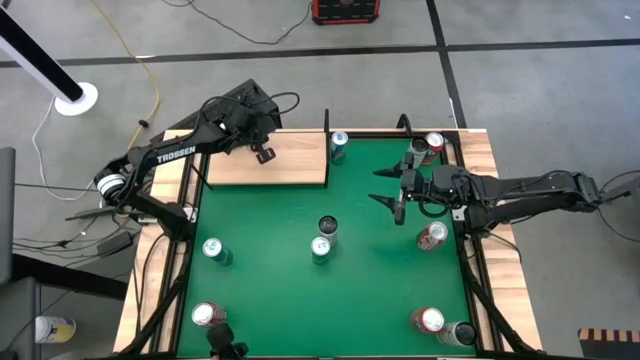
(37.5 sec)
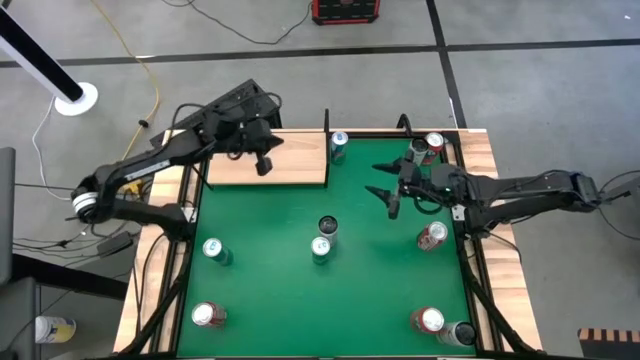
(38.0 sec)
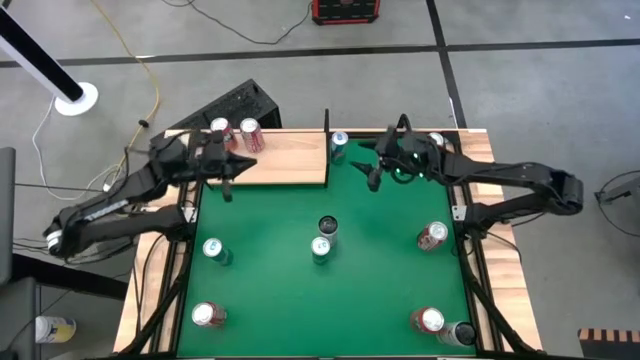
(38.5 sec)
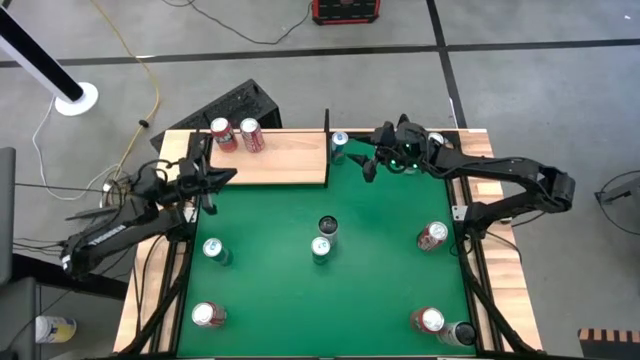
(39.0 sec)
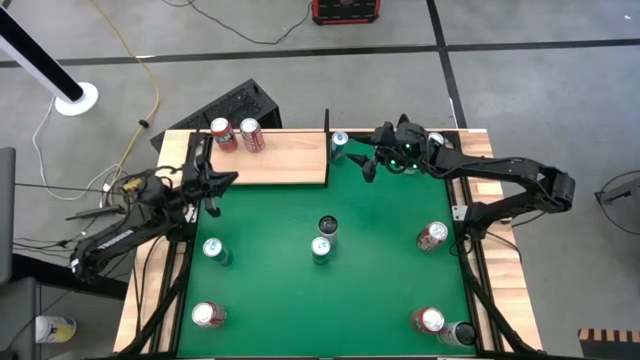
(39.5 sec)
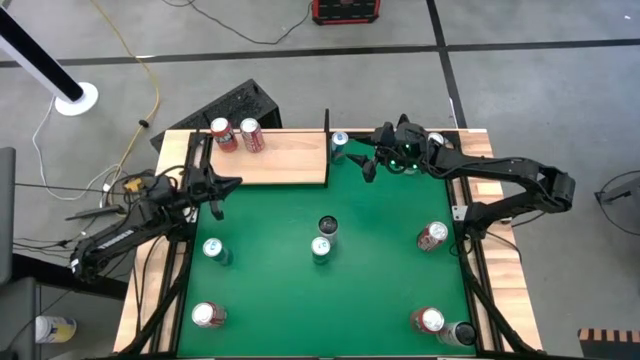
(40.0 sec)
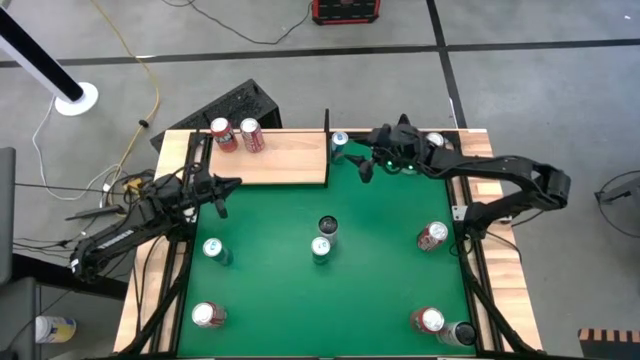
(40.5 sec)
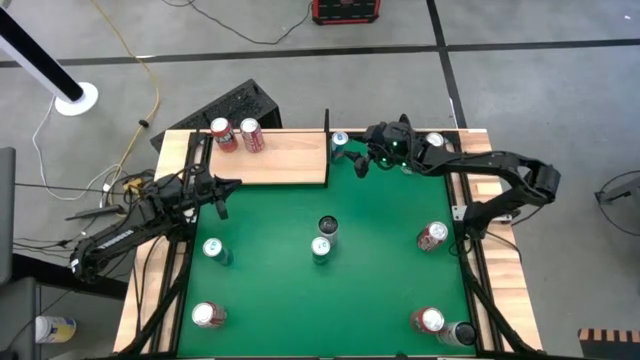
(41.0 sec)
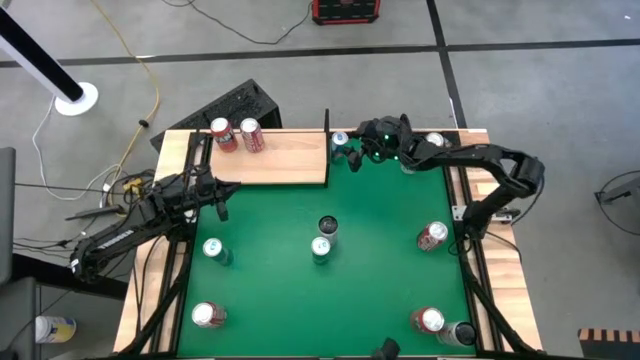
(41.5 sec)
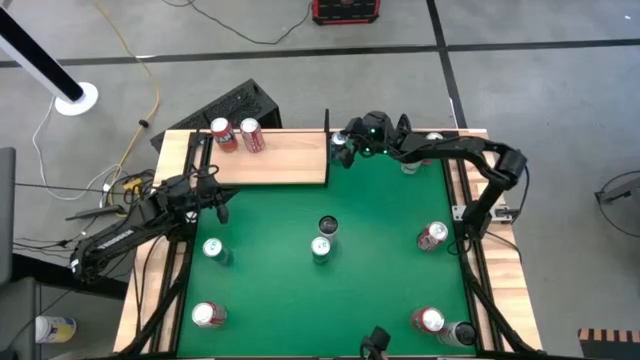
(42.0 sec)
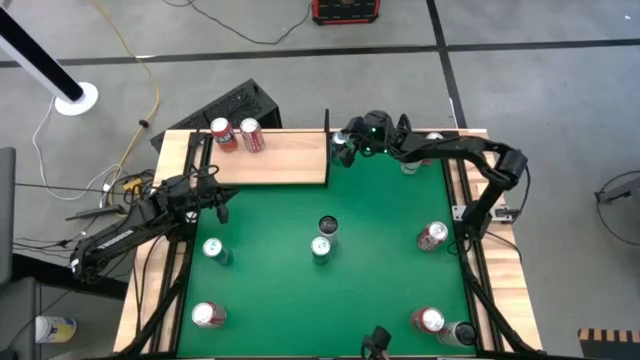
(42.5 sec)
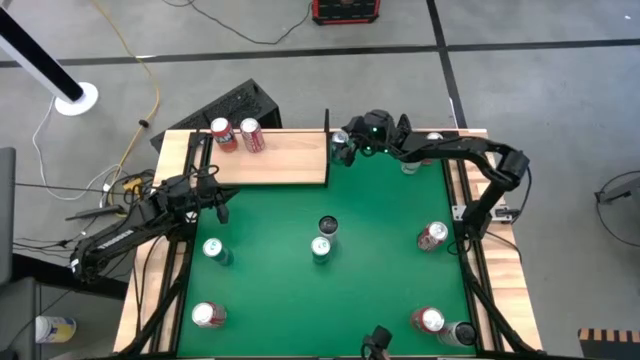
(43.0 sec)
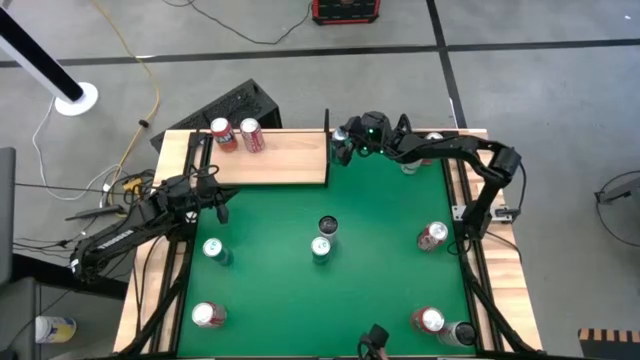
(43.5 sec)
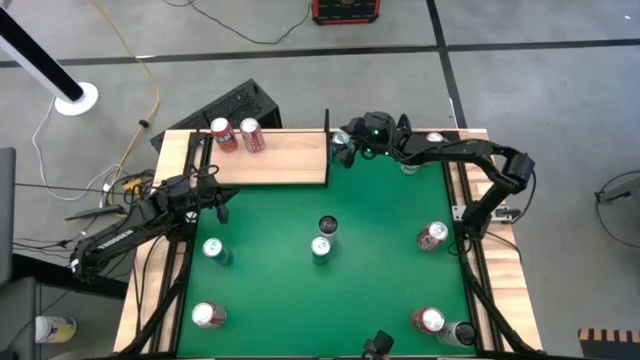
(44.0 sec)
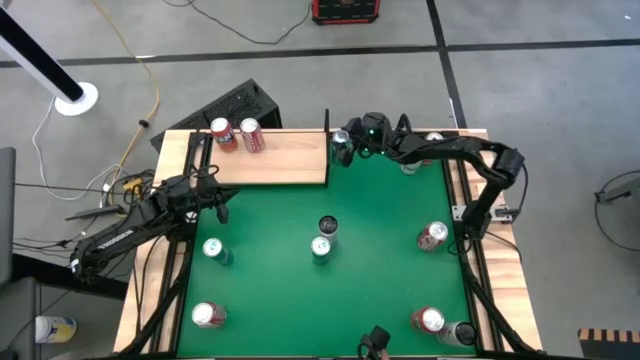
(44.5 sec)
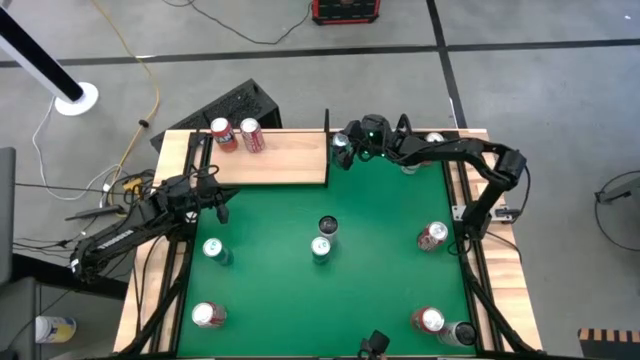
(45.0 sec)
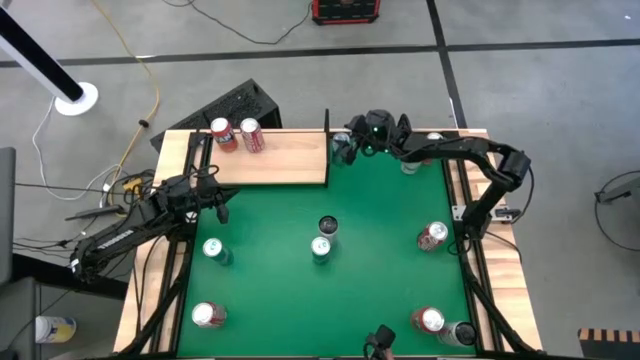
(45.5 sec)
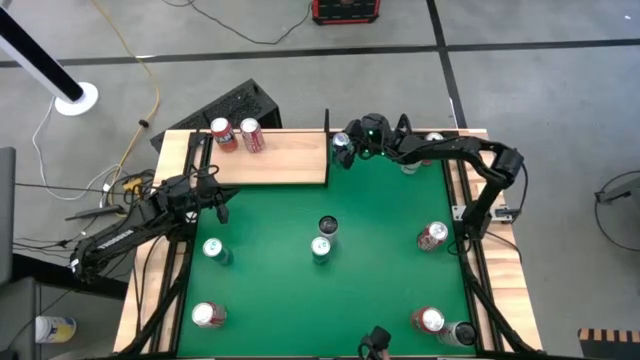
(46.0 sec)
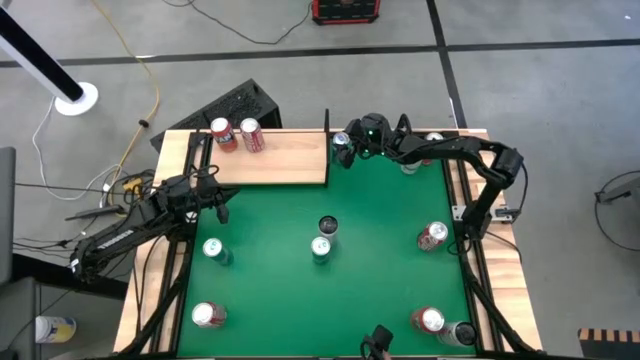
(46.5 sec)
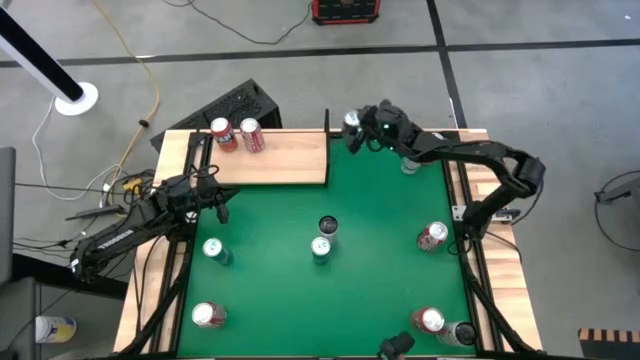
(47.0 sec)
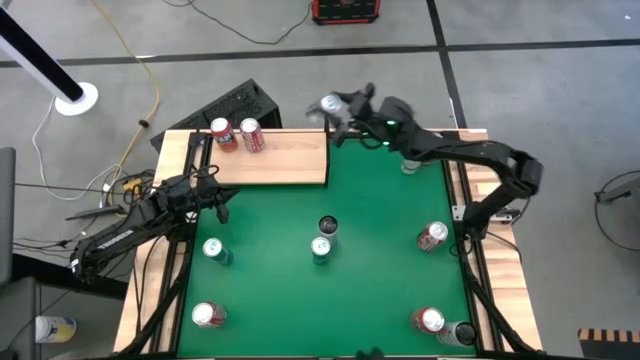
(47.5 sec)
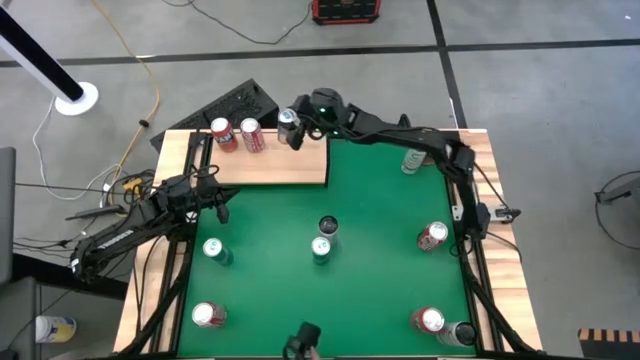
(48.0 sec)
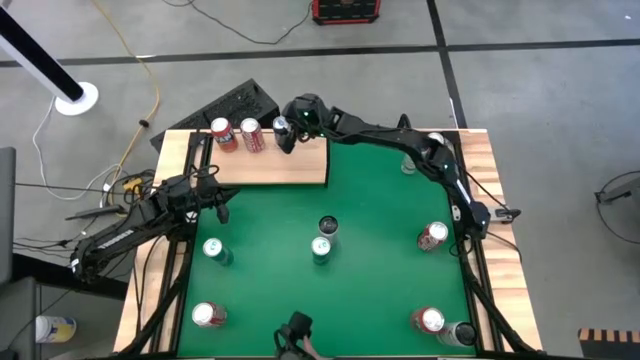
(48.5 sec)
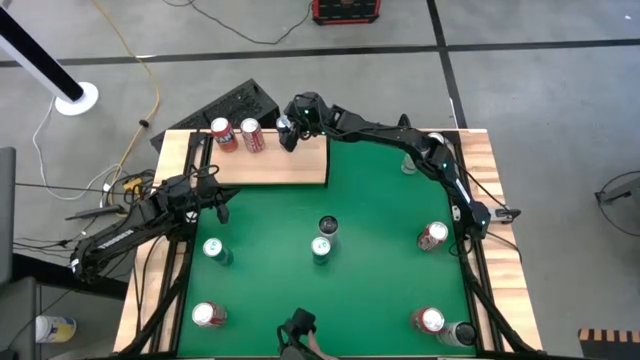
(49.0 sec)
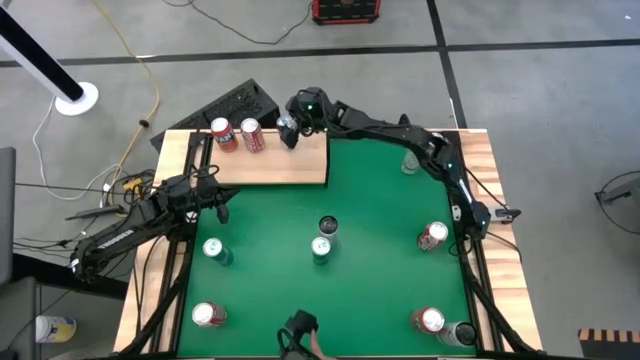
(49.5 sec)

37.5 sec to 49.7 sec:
Task: Place canned beverage on shelf
Put the top blue soda can on the shelf

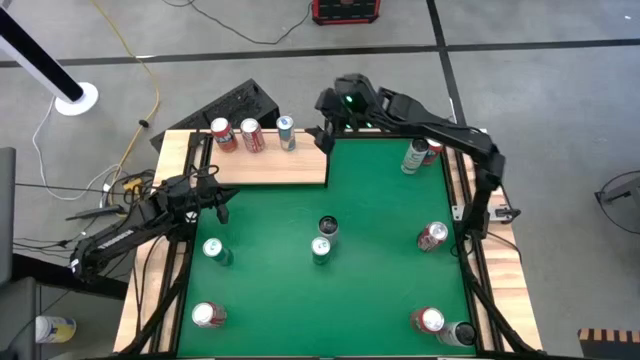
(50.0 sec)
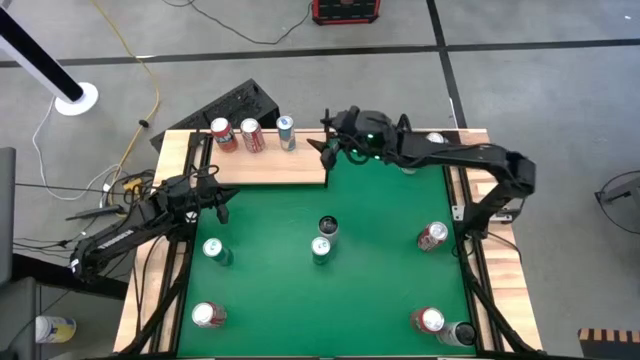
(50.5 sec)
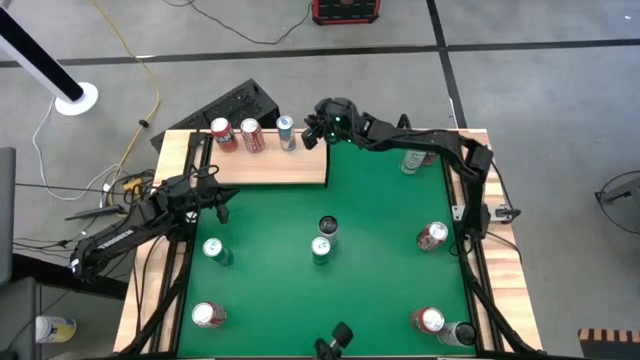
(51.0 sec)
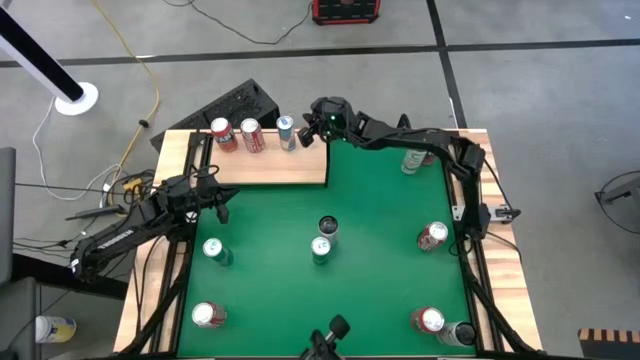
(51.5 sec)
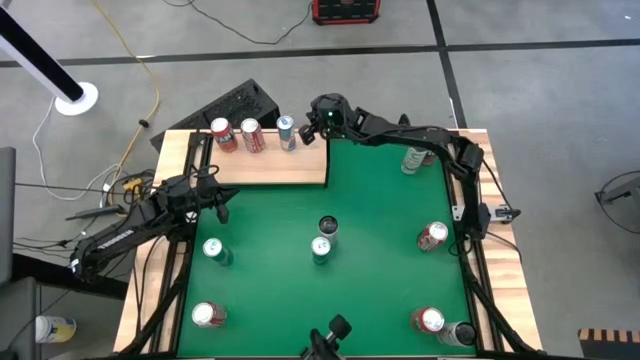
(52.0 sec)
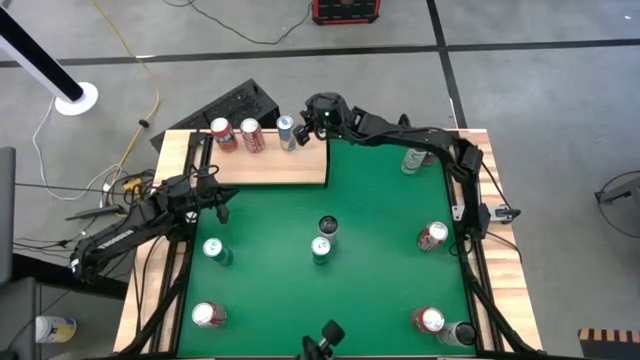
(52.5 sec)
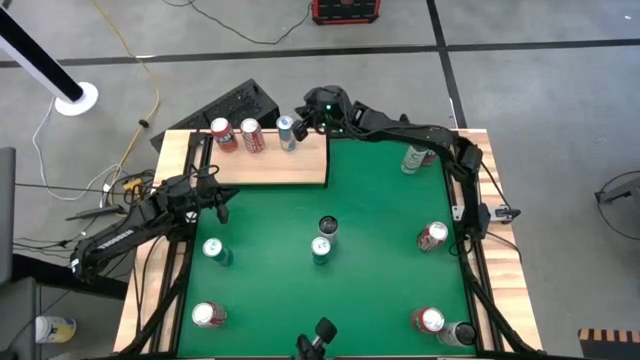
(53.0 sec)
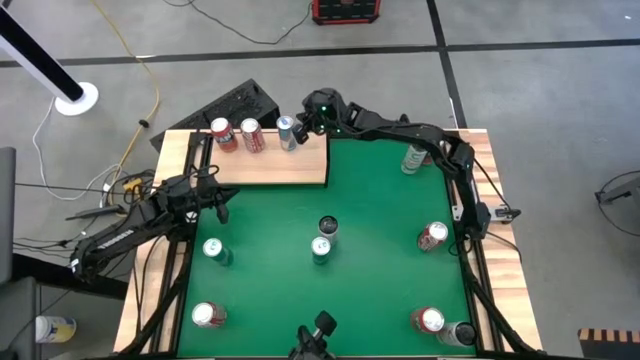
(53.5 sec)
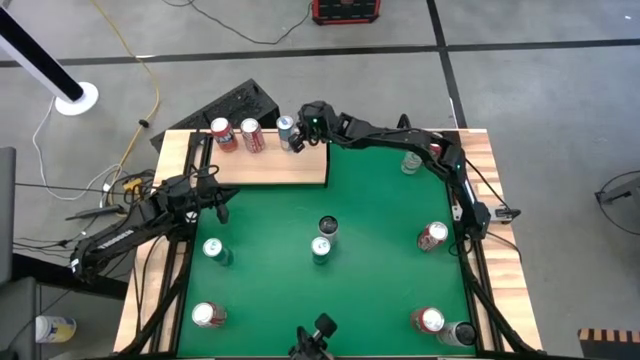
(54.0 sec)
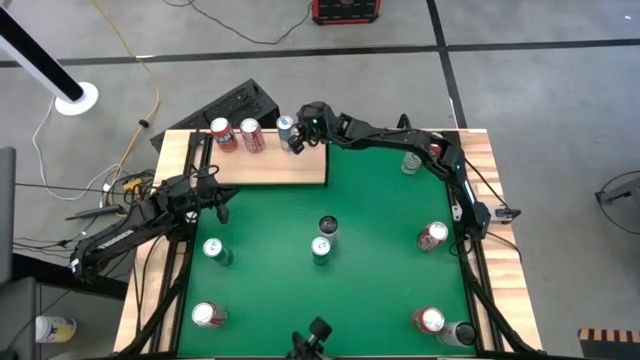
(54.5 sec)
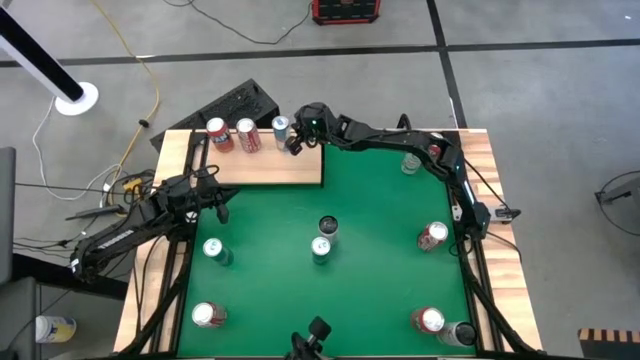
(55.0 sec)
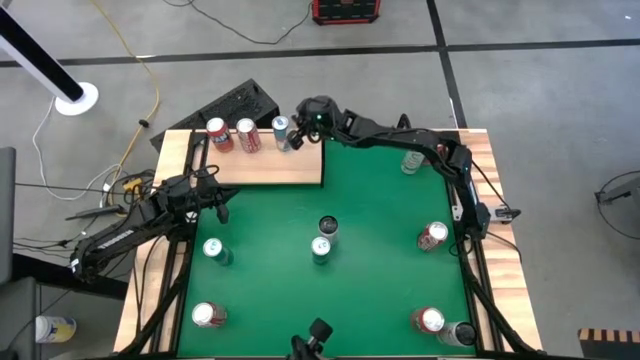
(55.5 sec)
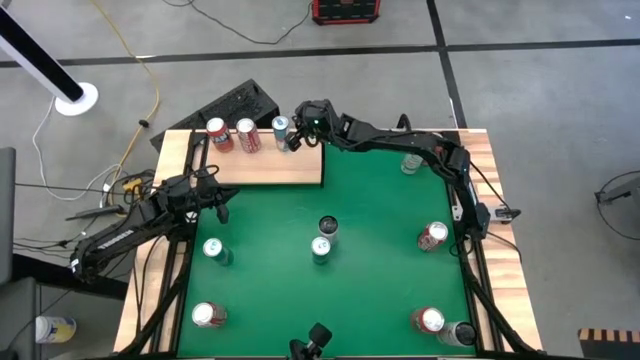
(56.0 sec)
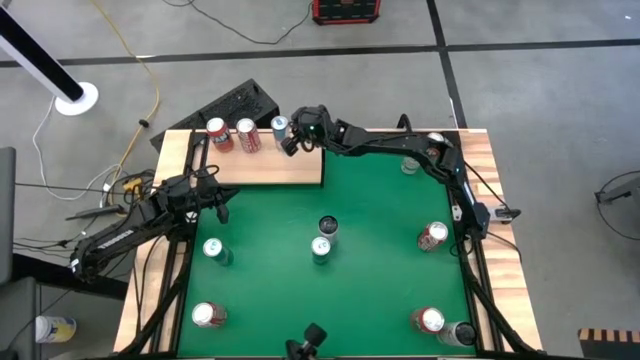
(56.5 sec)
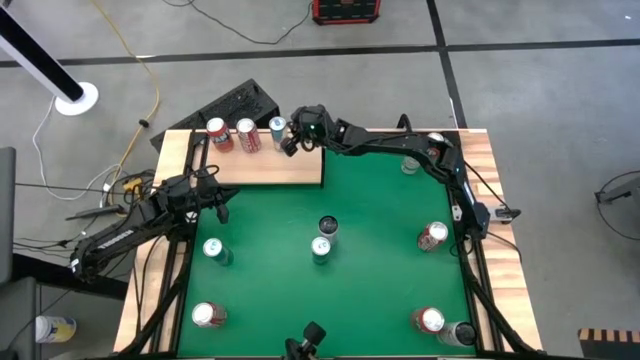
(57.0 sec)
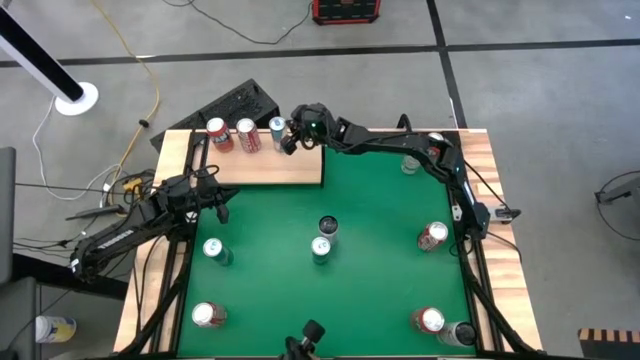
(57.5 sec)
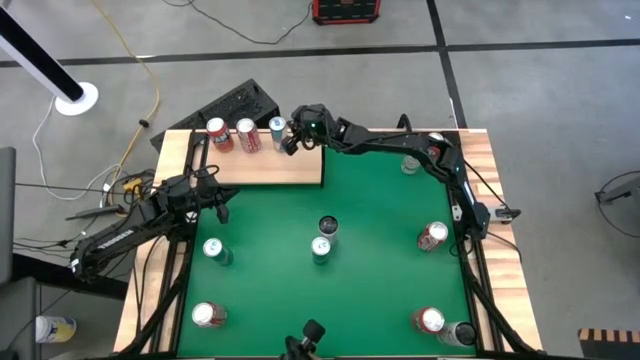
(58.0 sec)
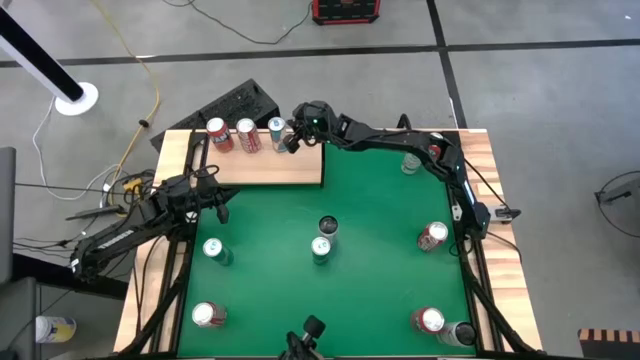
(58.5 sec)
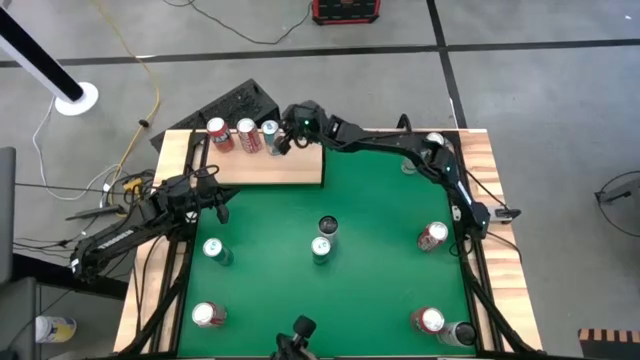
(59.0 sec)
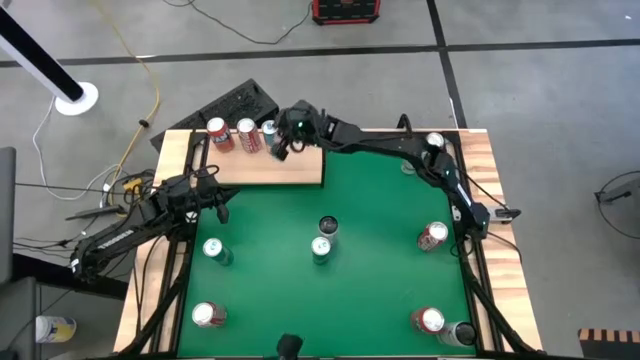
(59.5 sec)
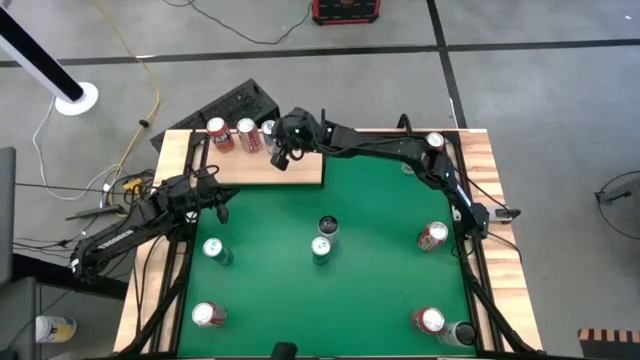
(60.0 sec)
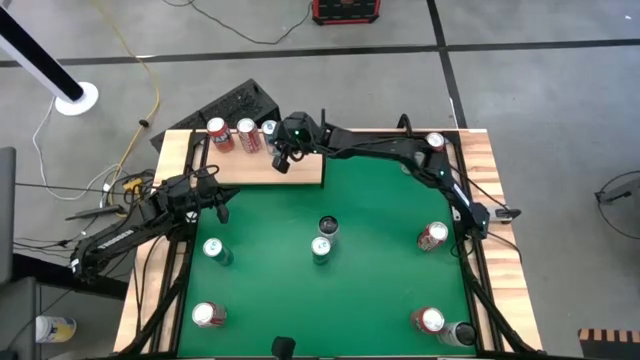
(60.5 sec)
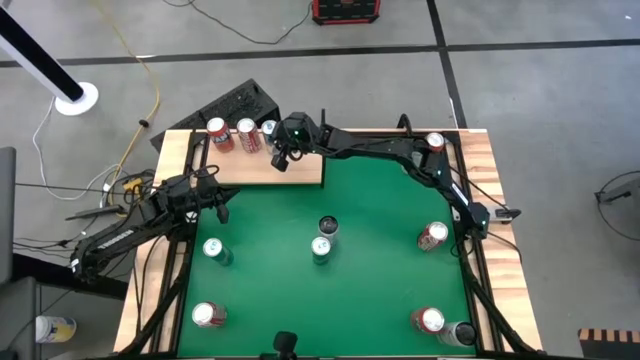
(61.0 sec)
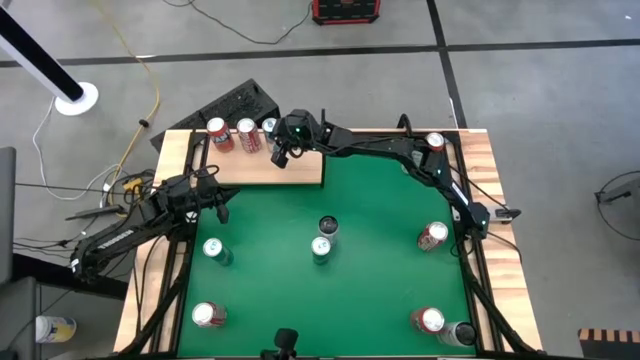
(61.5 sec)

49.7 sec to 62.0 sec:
Put the top blue soda can on the shelf
